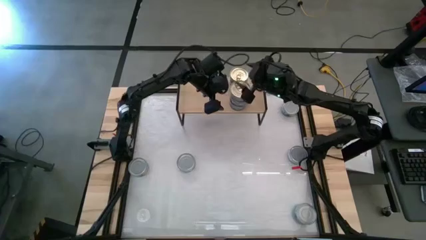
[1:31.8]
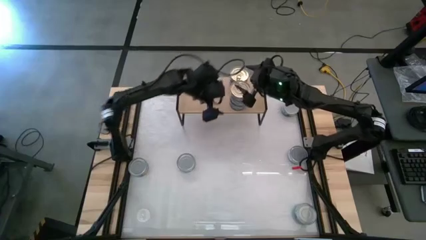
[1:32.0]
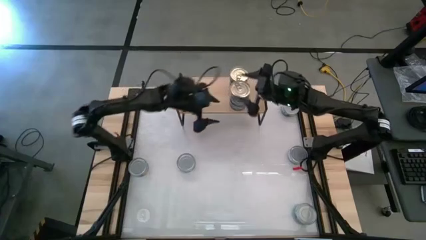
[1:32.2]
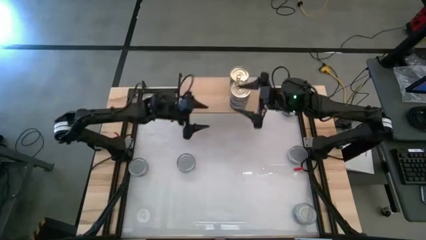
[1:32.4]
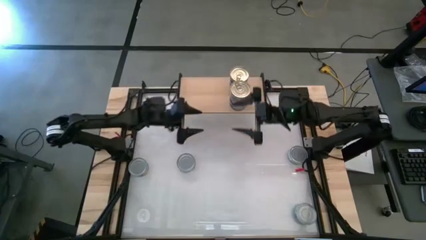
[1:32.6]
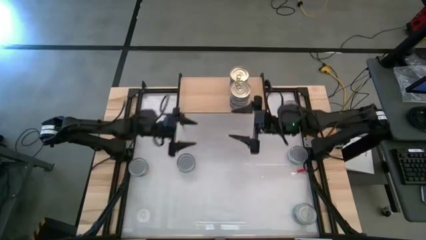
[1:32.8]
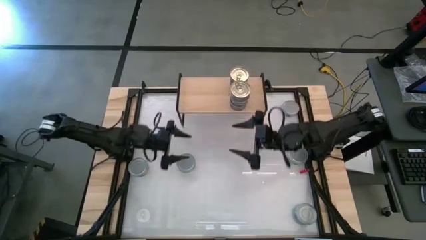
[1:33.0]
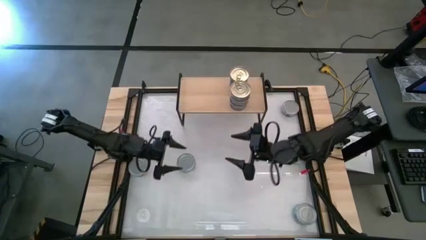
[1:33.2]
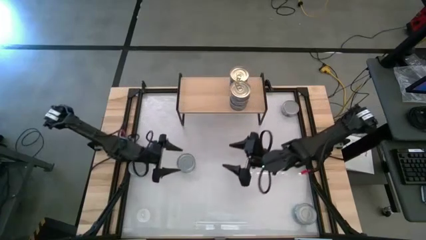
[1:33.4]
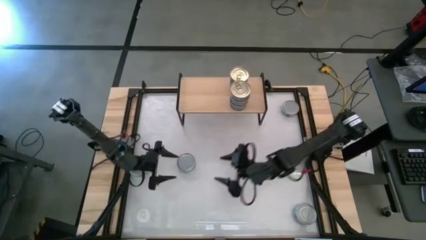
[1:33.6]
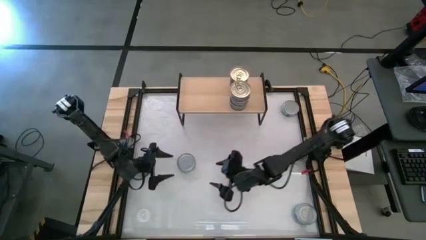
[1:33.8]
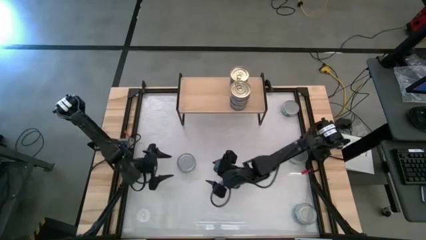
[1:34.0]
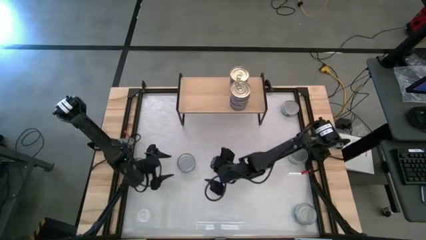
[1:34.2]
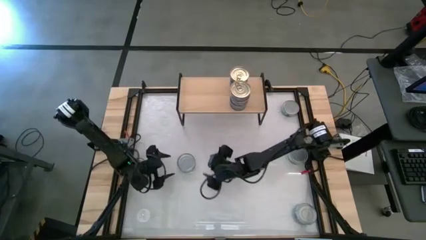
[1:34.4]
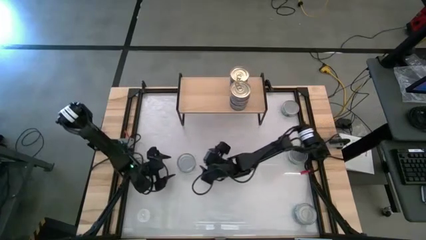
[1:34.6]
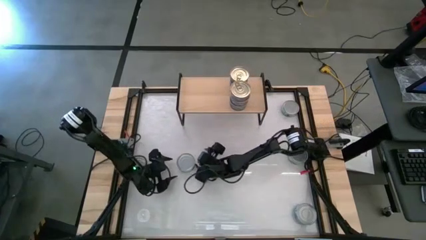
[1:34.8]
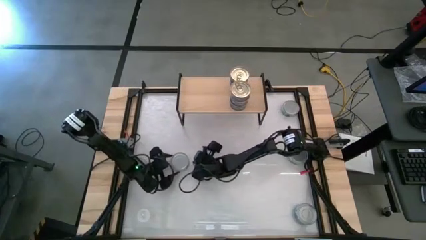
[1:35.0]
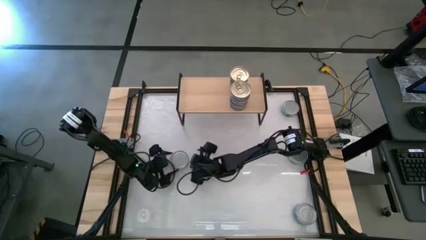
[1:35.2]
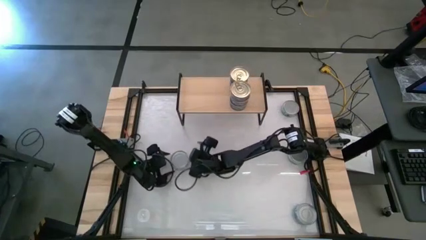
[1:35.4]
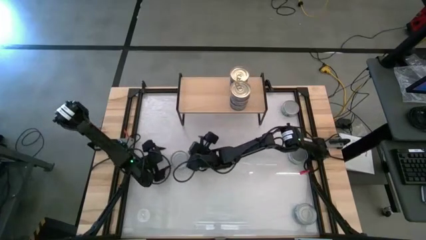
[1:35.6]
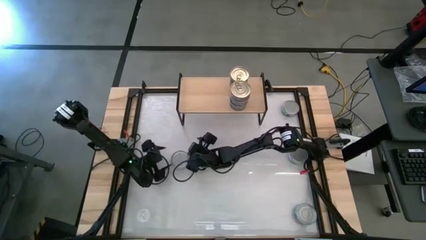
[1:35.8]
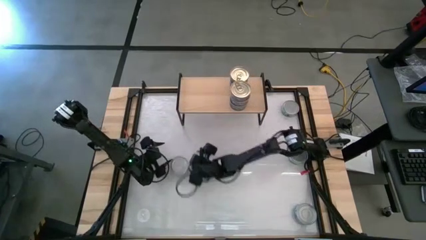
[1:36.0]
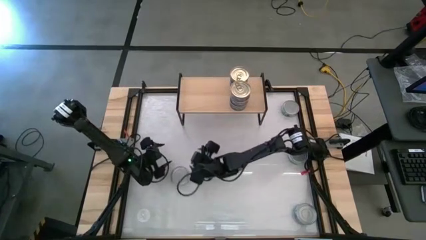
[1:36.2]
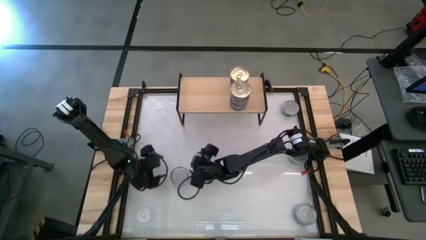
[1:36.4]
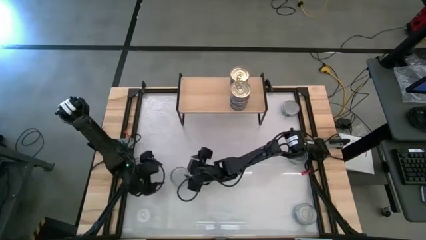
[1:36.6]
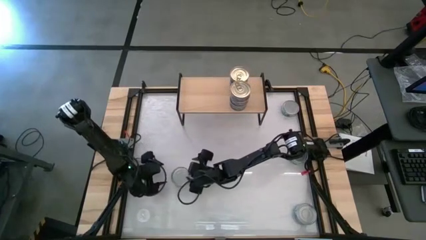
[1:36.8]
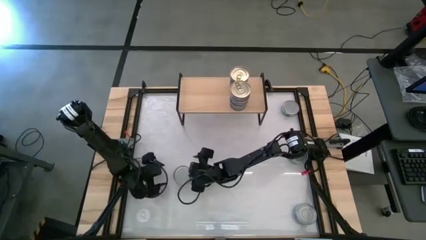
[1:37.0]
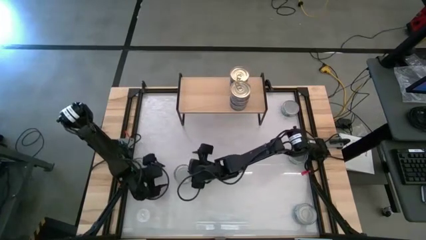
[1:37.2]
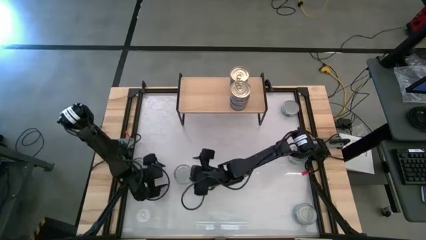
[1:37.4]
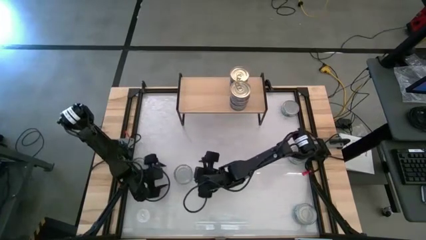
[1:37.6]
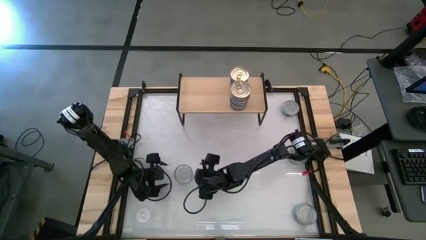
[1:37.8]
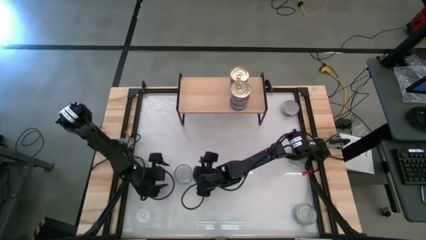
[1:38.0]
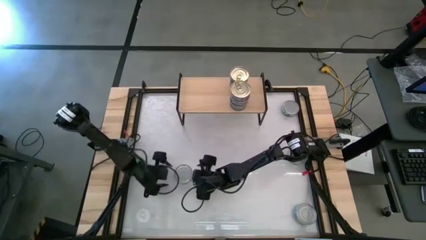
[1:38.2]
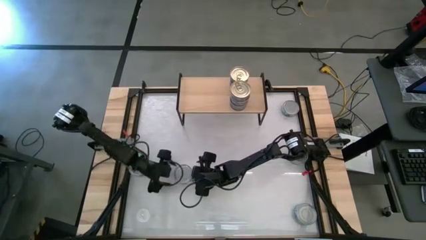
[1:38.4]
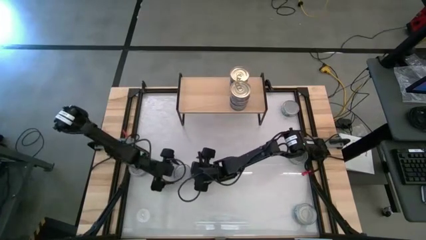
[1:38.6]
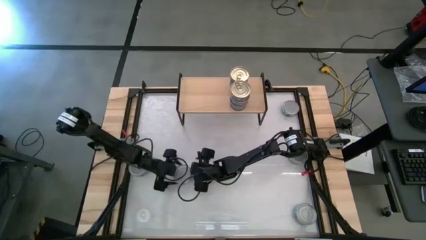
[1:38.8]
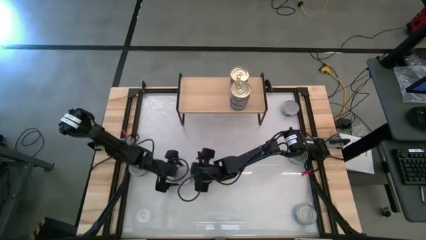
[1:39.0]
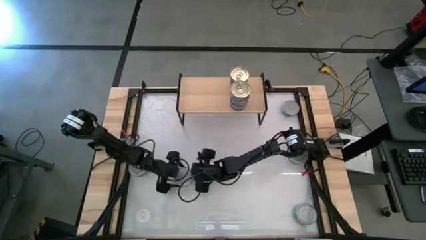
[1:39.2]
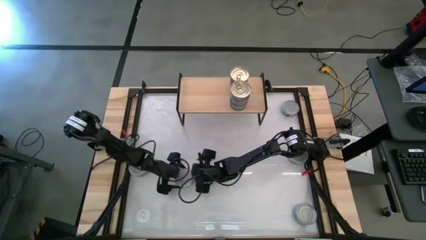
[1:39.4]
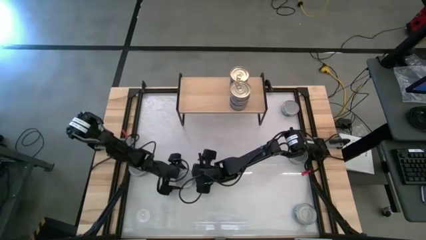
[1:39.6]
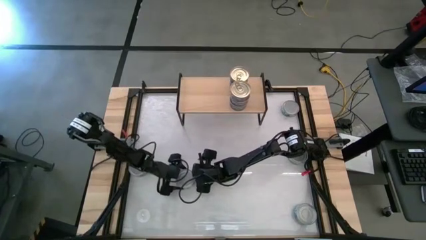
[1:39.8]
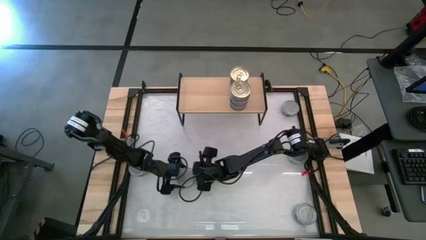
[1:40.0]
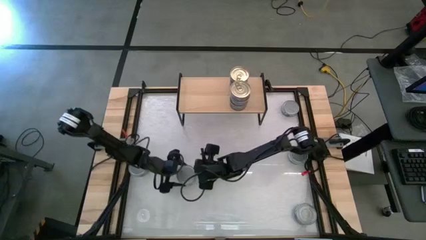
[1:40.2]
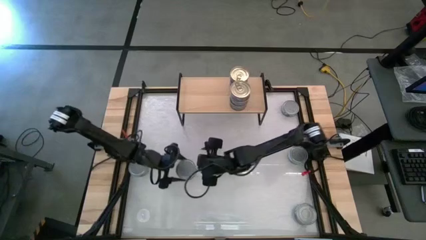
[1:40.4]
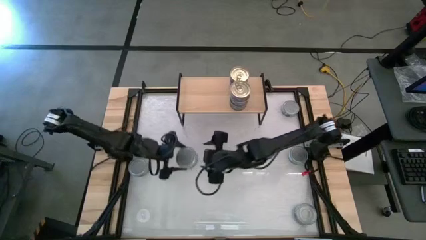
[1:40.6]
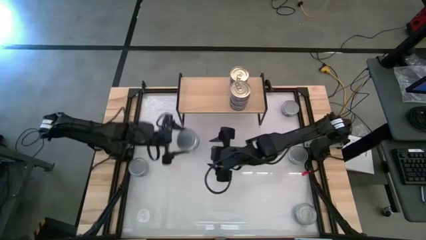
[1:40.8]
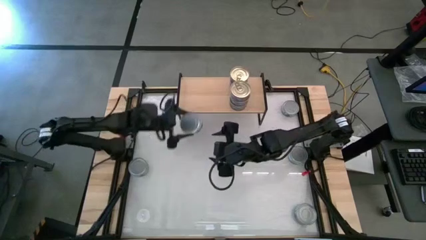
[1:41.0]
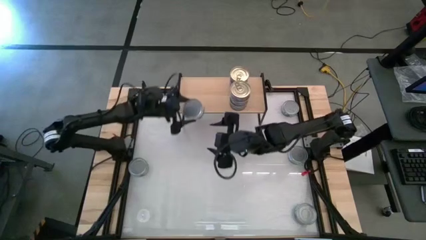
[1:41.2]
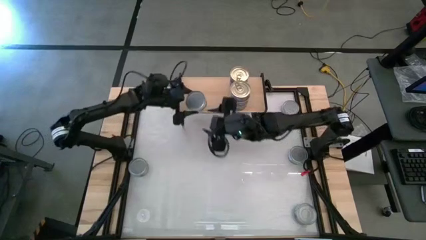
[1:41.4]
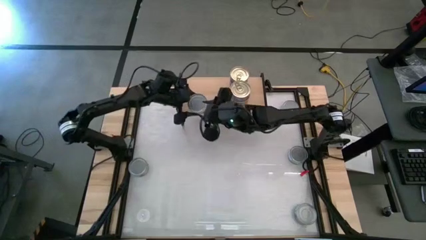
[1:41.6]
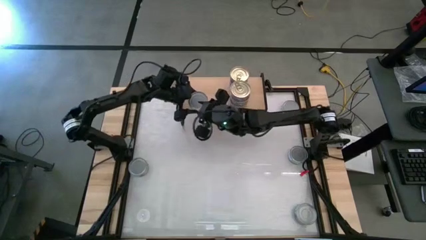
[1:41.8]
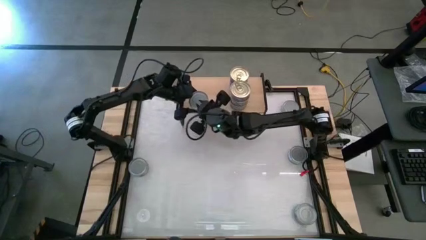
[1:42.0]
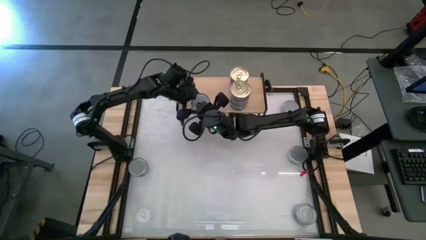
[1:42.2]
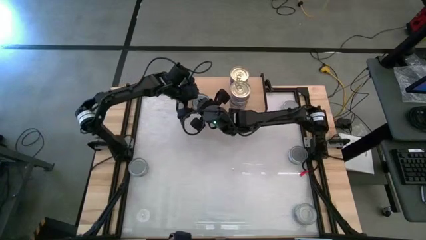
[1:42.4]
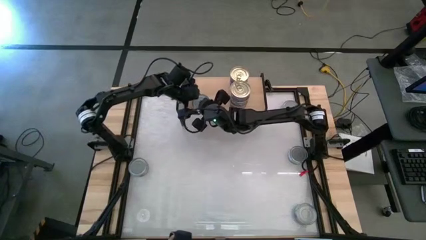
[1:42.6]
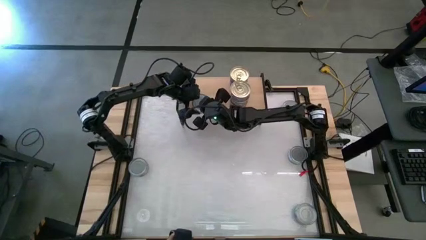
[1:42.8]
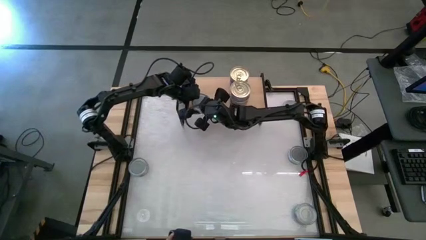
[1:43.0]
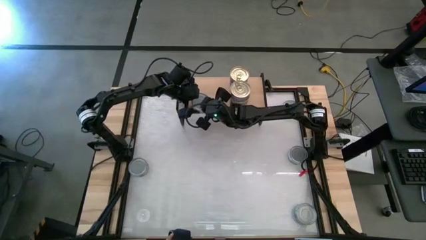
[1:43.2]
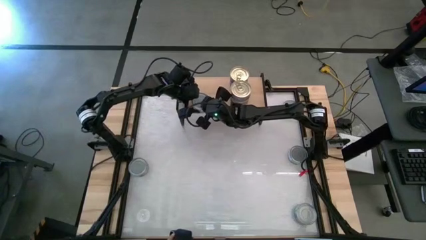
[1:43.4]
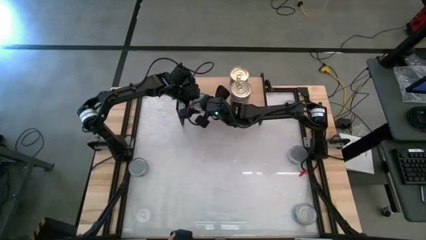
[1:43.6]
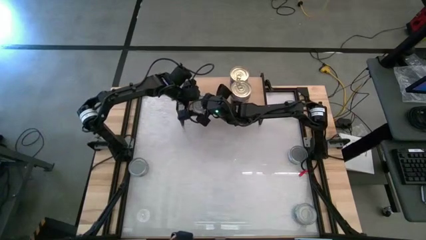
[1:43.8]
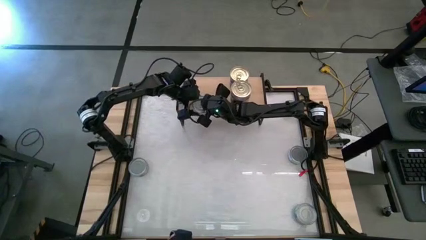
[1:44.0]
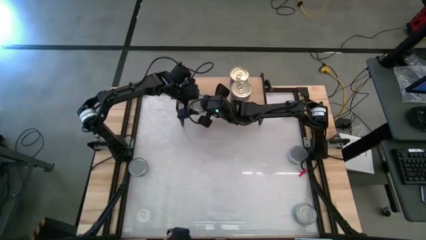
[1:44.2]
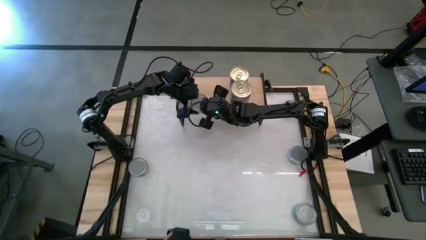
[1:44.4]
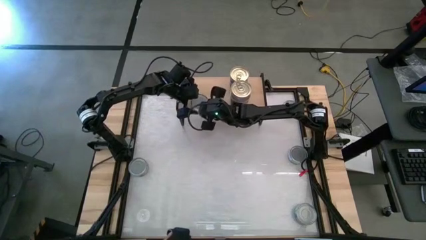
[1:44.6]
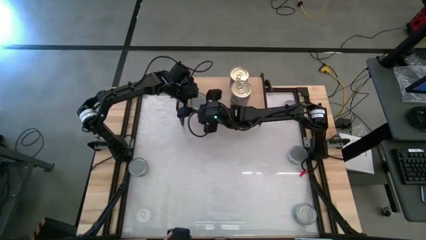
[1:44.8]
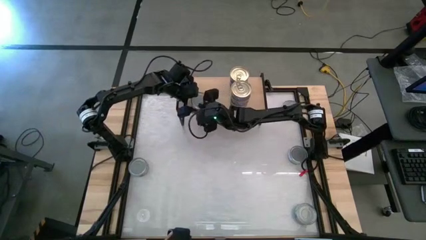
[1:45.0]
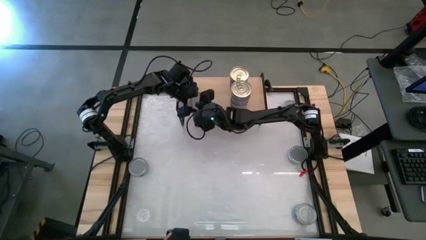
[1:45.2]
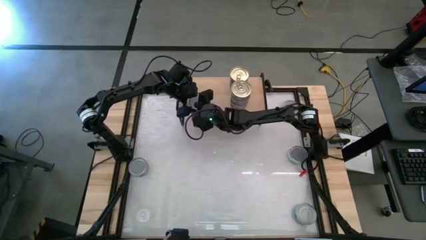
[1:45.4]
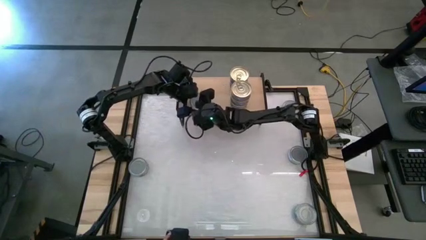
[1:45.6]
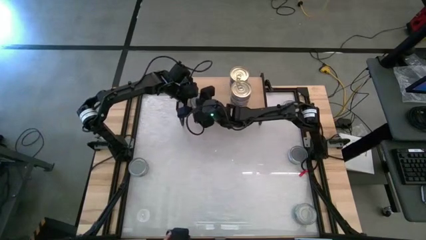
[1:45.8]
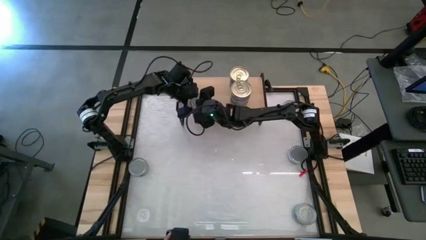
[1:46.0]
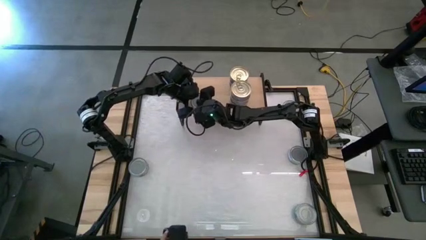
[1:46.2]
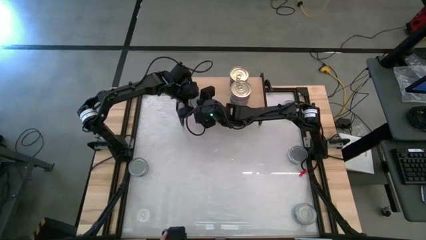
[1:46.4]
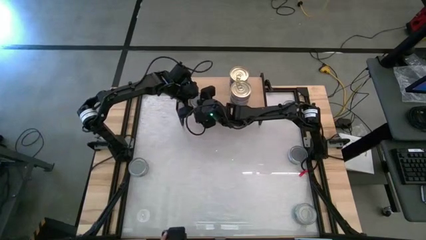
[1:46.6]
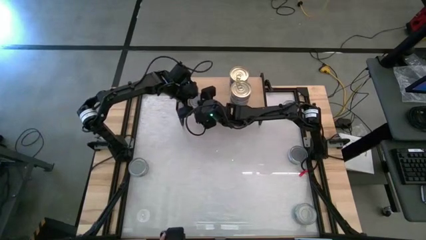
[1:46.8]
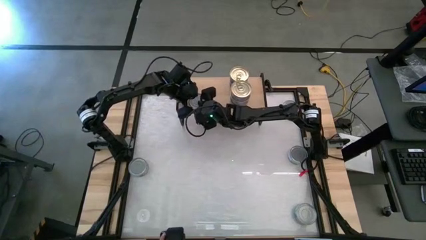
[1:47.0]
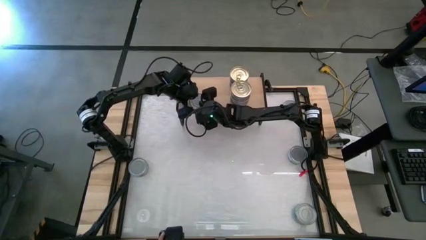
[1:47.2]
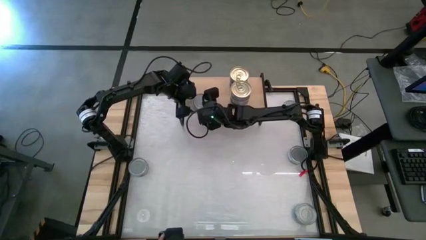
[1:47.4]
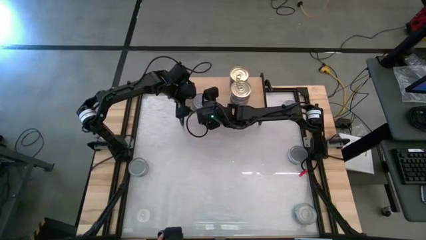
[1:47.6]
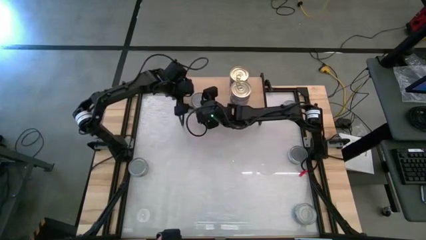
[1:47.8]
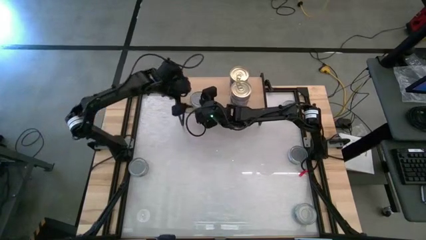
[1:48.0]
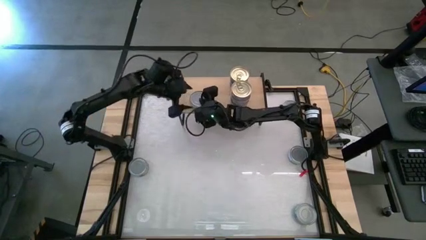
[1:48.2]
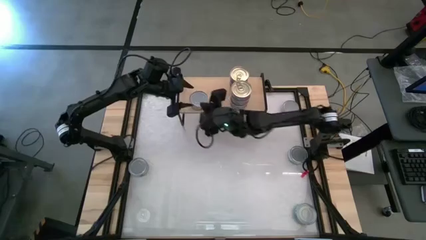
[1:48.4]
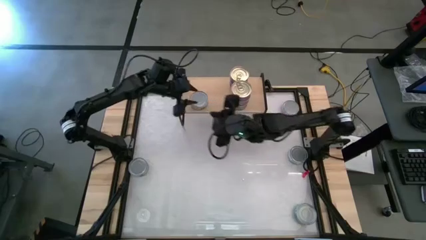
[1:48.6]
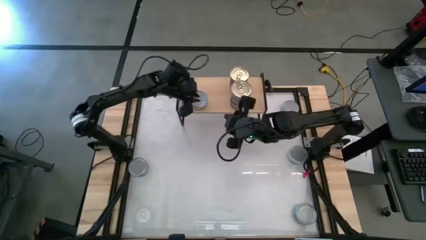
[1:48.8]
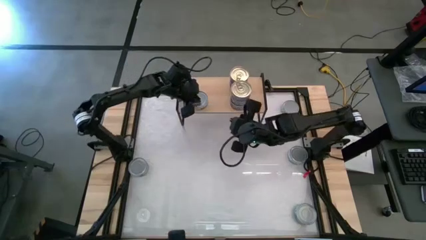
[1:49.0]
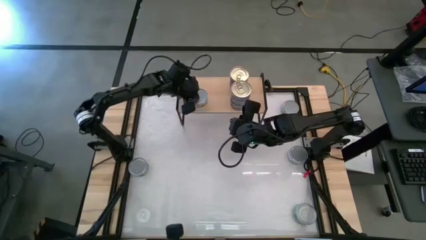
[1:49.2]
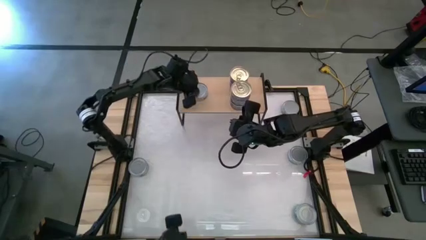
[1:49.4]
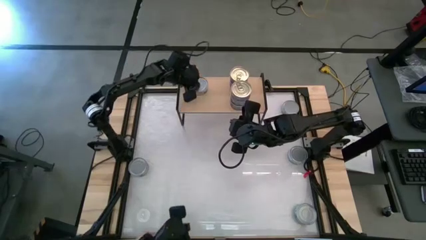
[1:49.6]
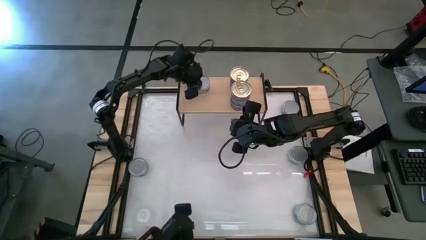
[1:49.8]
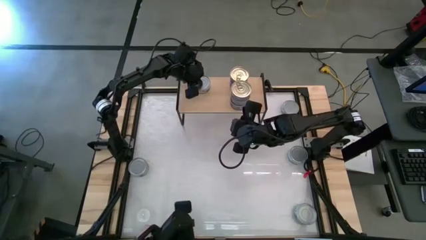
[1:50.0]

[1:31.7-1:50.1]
Task: Stack canned seafood by type on shelf
Put the green tuna can on the shelf
